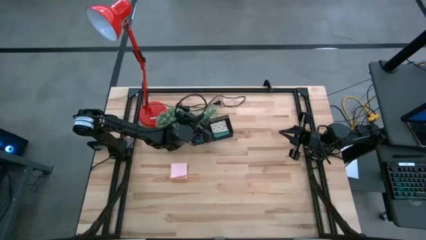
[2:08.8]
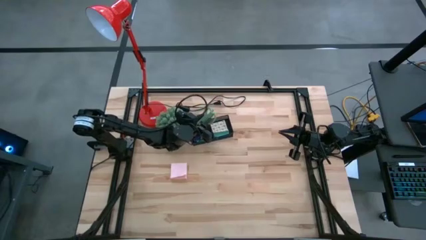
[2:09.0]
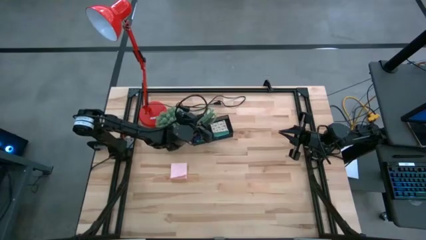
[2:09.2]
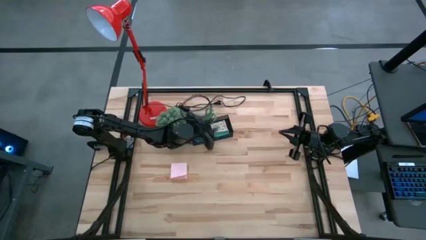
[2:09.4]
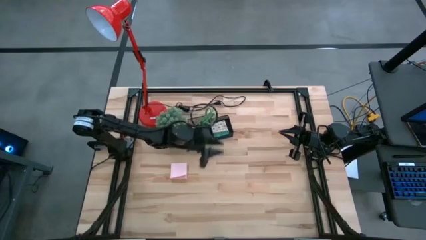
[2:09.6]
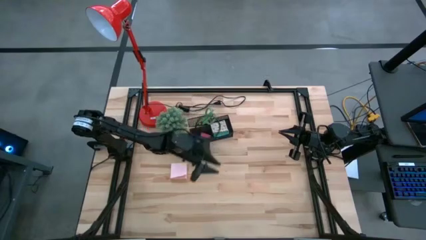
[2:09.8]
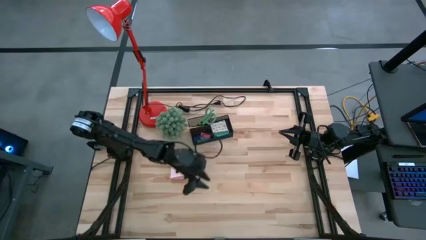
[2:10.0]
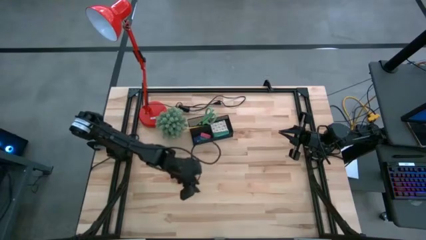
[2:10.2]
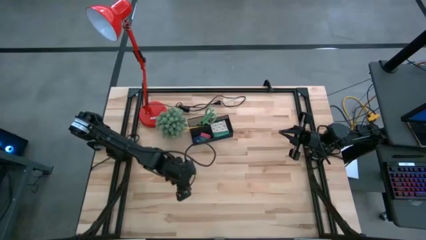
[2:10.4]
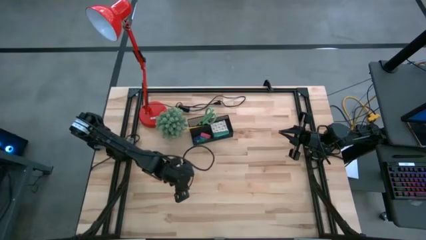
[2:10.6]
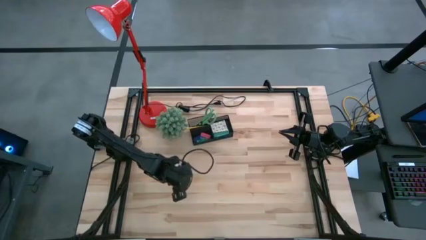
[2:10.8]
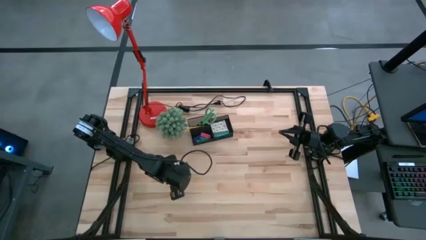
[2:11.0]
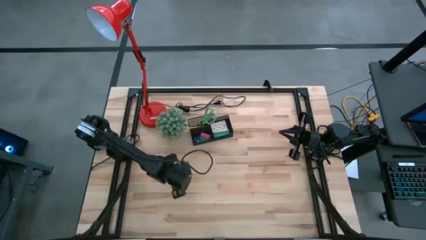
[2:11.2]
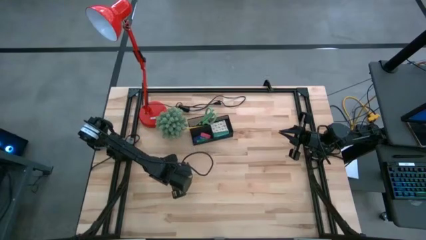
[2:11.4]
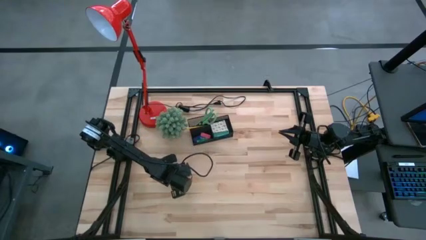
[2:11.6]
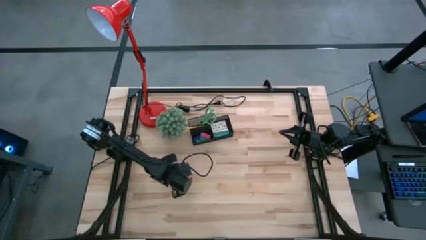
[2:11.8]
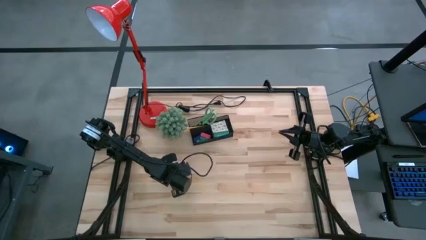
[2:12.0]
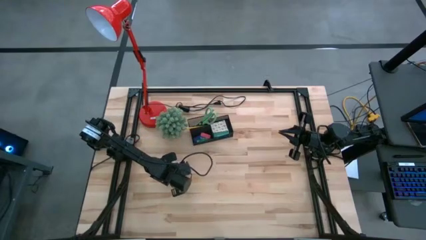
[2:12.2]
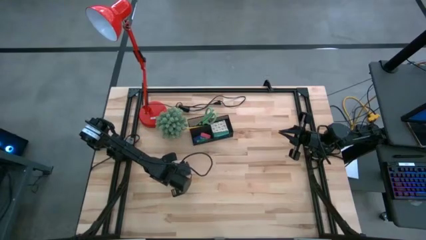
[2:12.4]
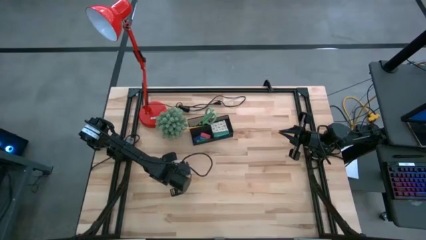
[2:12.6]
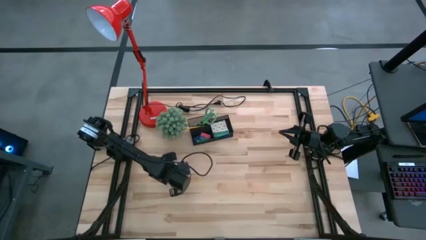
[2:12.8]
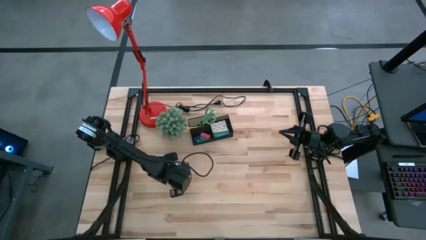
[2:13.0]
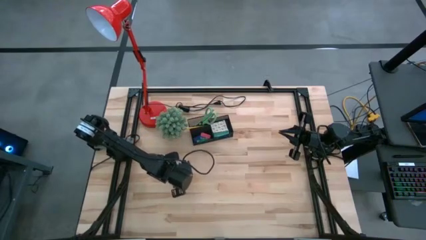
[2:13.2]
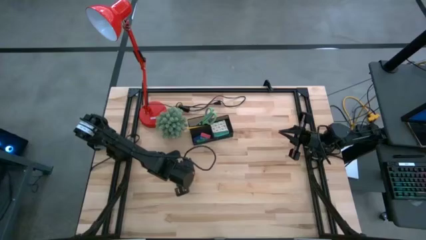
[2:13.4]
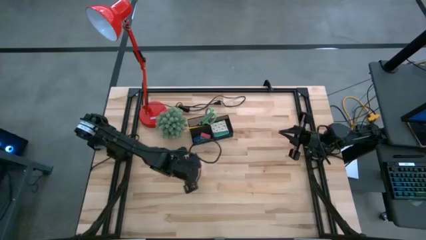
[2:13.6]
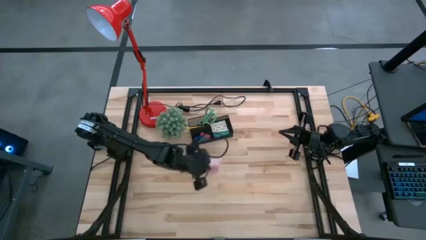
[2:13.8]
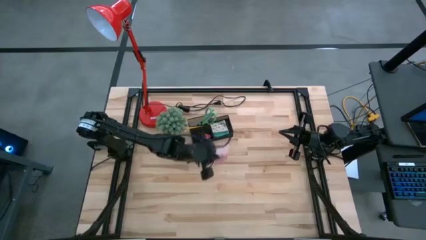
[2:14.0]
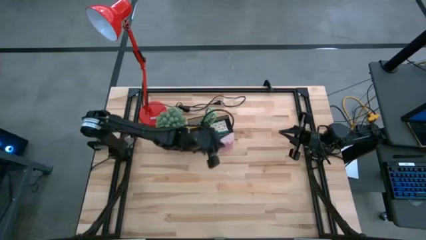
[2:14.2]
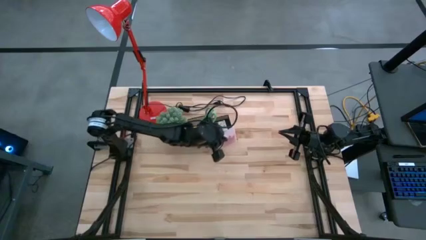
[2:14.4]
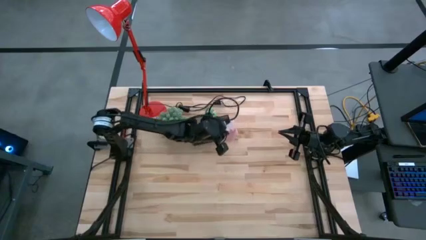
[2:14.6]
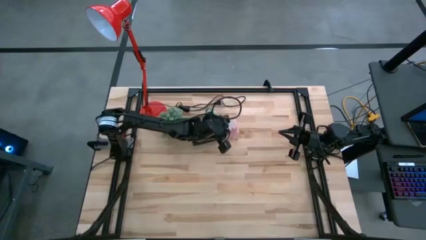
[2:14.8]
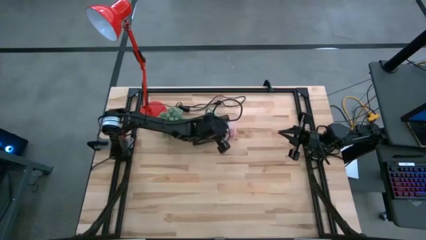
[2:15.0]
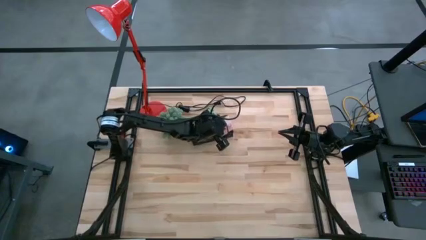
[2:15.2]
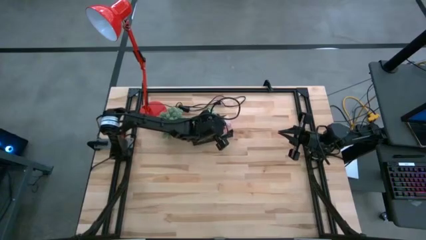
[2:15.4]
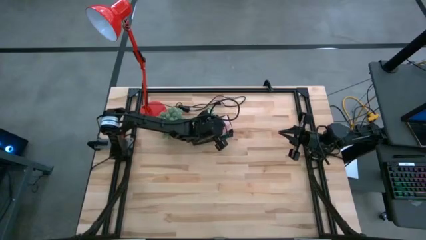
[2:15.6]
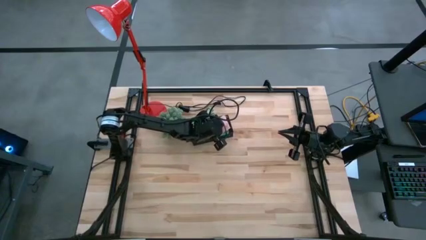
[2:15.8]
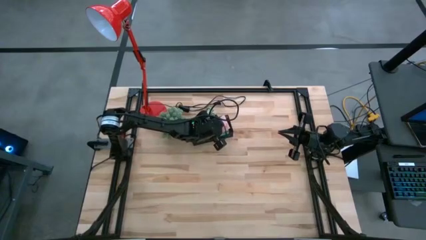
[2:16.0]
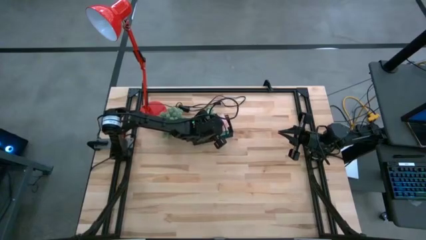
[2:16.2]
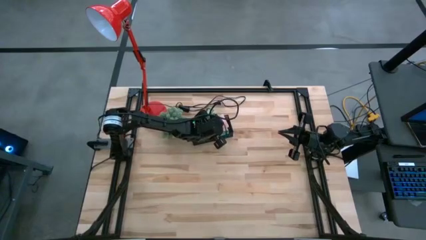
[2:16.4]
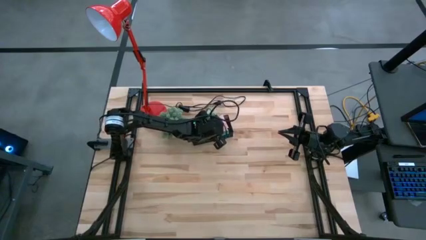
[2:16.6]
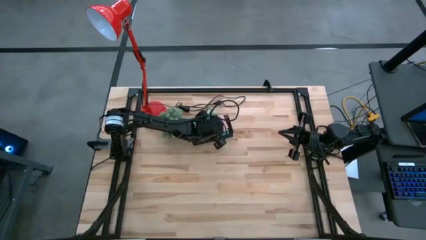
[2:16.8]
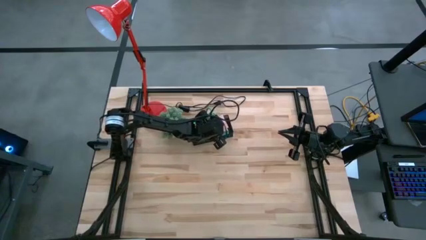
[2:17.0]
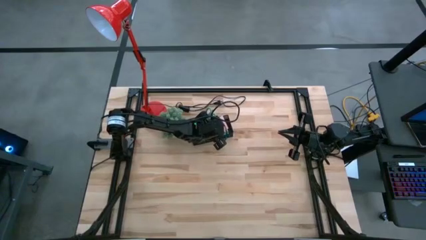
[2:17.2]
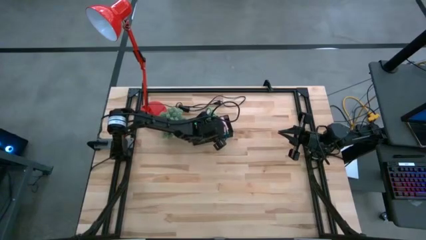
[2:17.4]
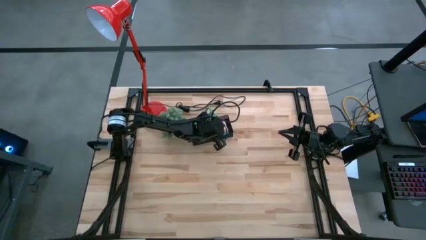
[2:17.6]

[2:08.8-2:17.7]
Task: Pick and place office supplies into organizer
Put the pink sticky notes into the desk organizer

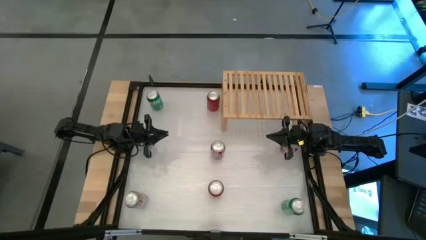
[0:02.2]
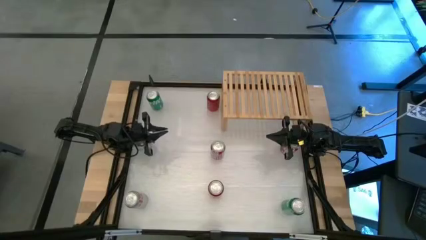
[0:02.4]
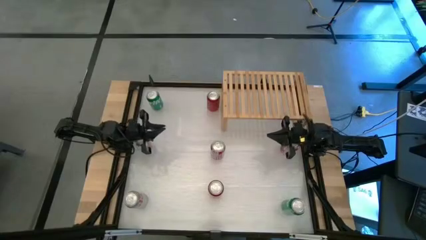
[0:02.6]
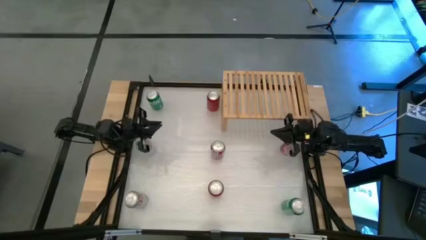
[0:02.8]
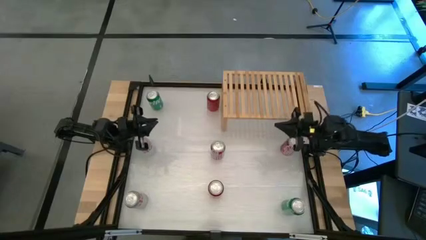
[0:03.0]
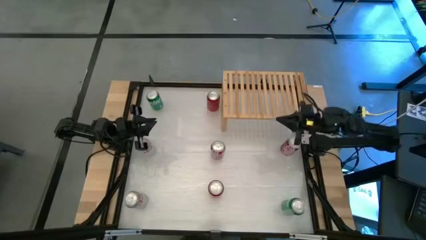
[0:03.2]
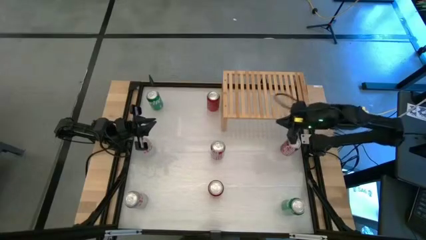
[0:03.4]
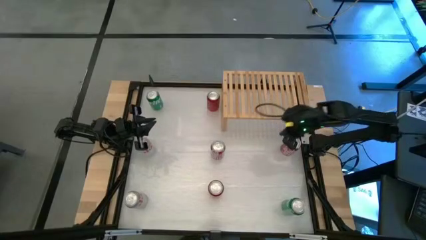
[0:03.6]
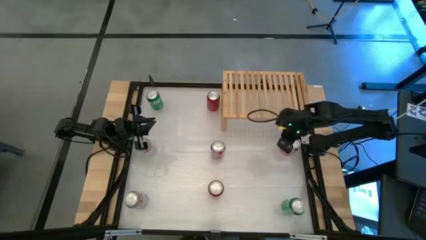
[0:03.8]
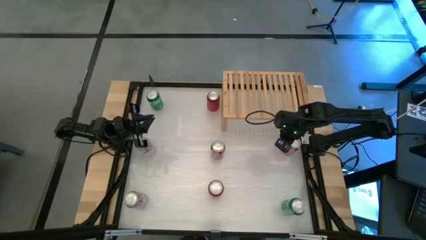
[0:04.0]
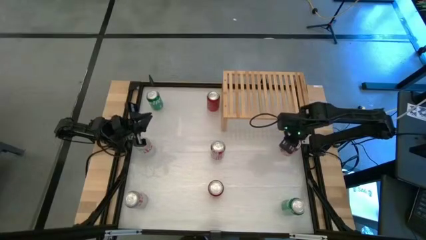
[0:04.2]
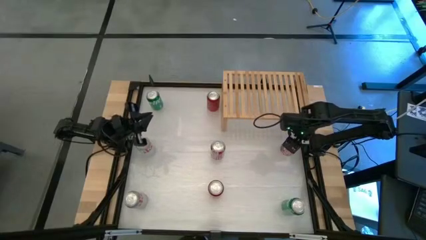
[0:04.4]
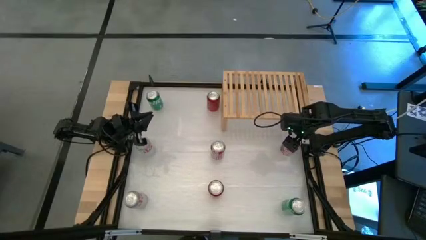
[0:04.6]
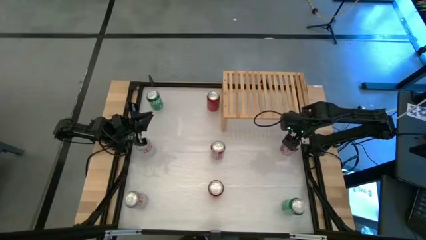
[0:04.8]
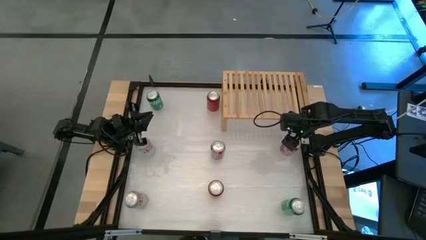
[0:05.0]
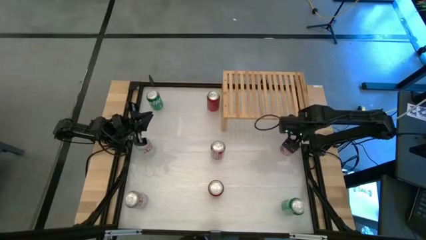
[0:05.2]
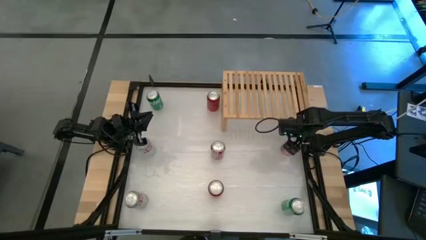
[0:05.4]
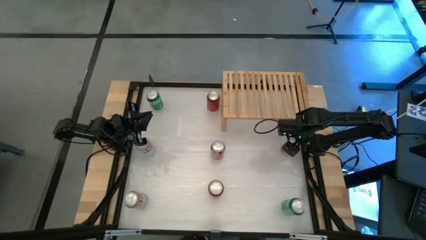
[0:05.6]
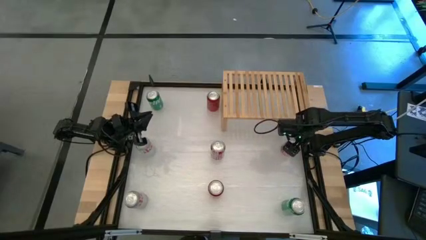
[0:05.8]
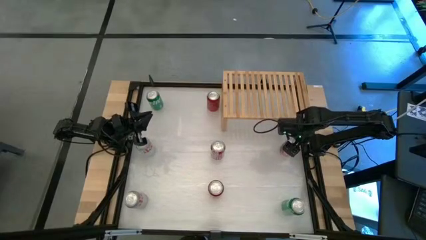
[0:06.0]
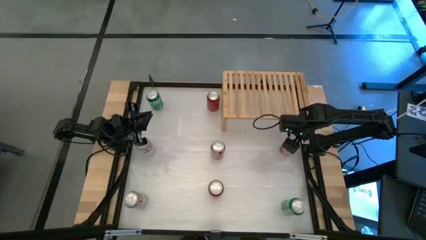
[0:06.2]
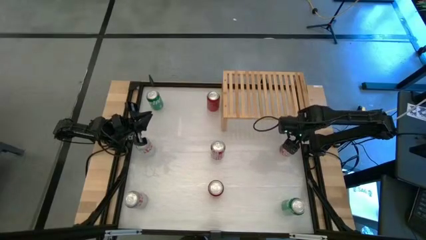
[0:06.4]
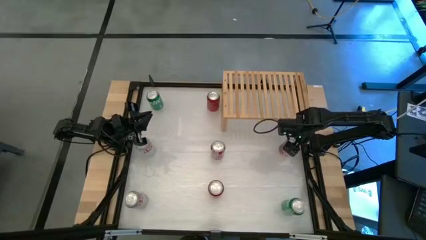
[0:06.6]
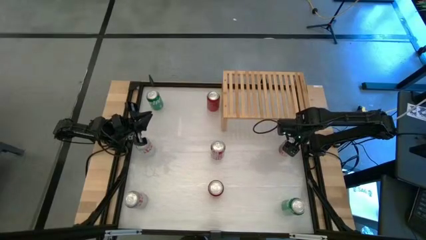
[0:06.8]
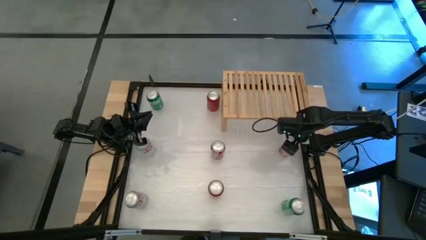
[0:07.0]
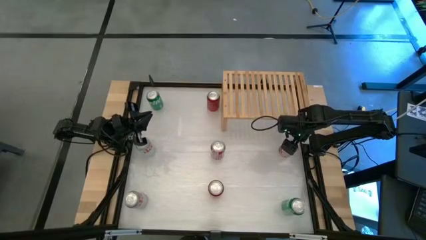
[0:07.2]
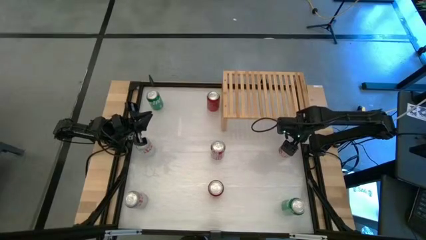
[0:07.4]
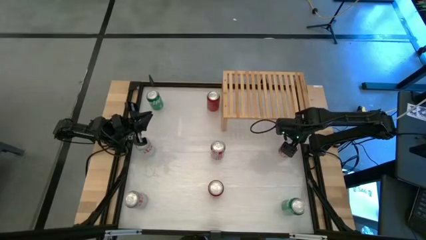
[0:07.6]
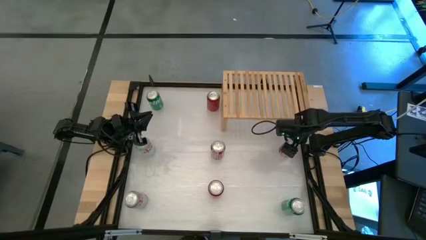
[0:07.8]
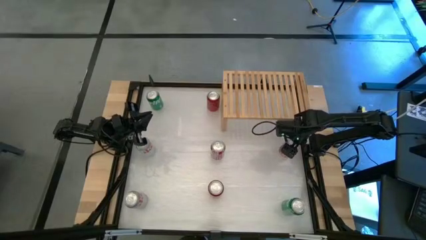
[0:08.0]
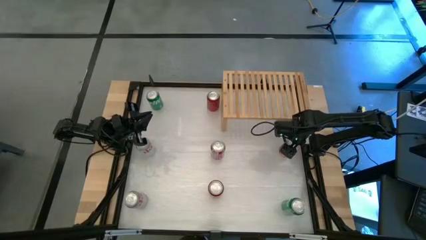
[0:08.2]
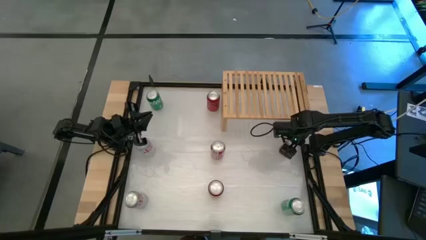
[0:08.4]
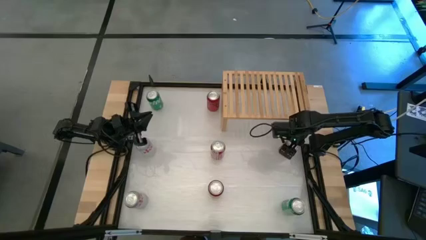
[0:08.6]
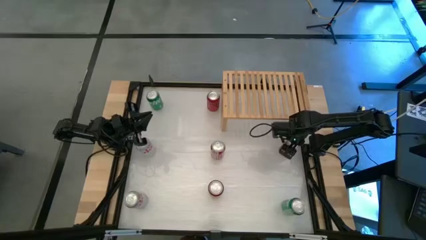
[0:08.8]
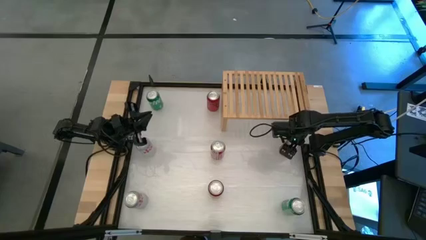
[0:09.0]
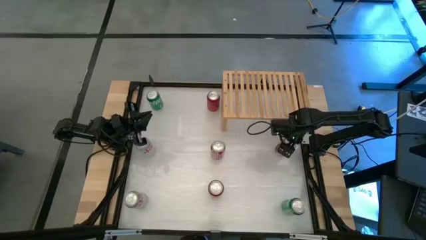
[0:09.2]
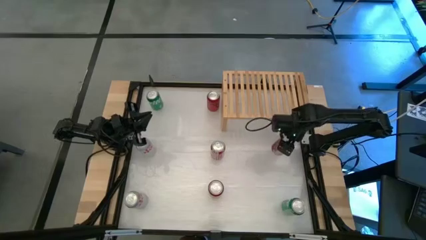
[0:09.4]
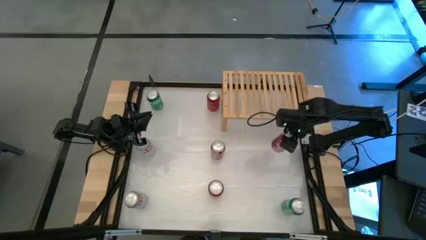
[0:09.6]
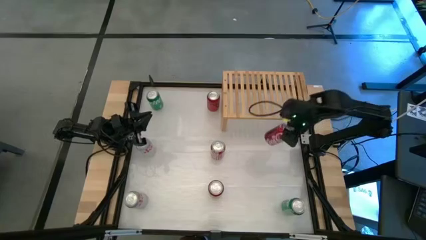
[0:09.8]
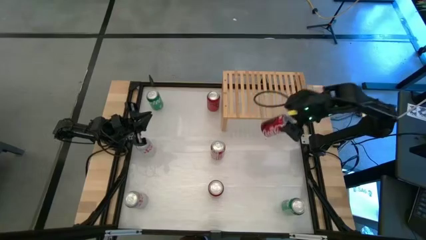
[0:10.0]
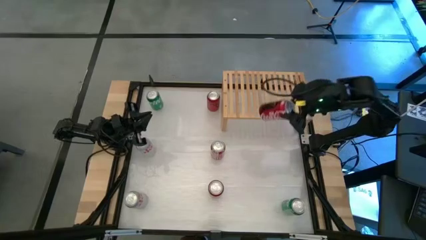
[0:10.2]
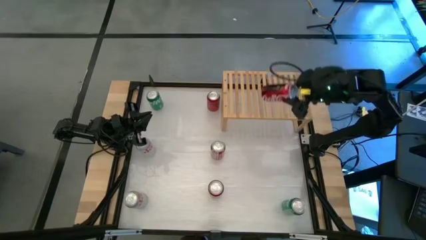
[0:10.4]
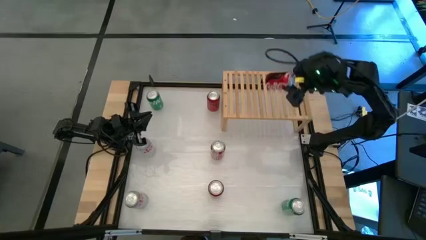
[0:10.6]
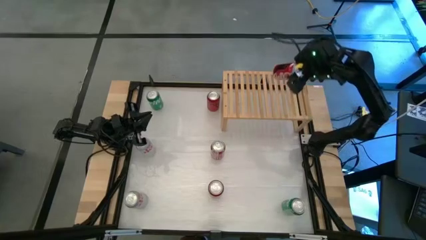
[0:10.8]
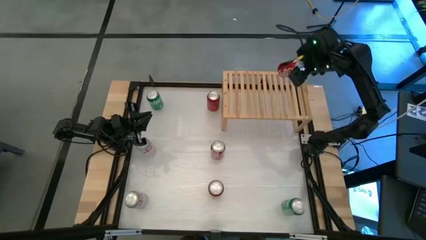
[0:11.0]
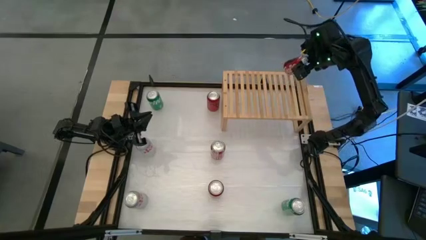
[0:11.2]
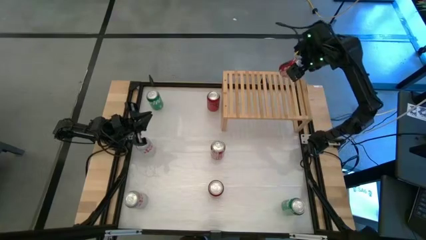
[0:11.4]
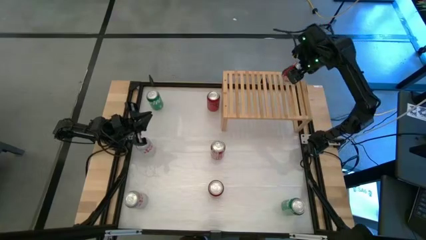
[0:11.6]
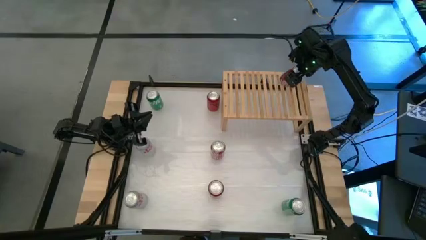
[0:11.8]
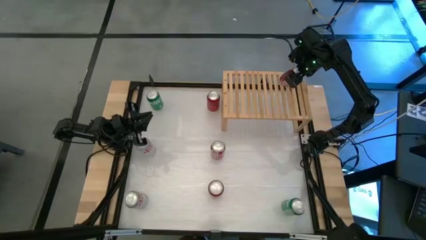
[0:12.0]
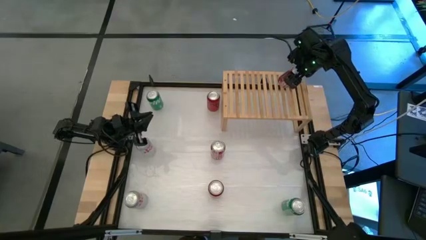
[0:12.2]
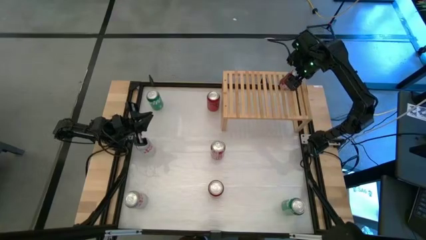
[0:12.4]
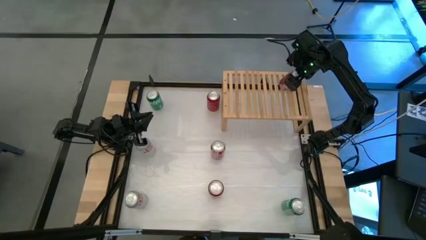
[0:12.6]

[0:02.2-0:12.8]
Task: Place canned beverage on shelf
Put the right red white soda can on the shelf
